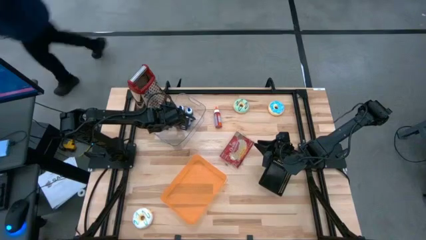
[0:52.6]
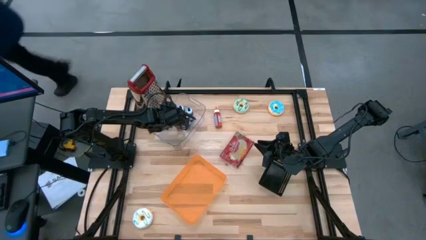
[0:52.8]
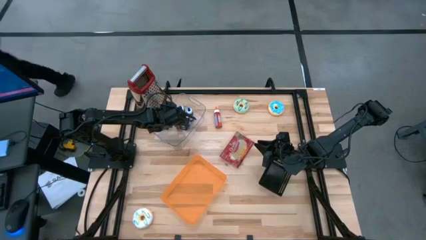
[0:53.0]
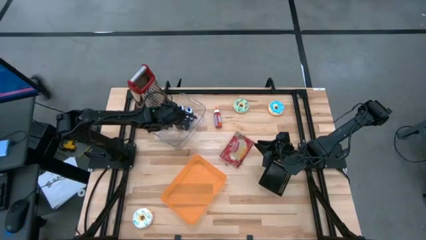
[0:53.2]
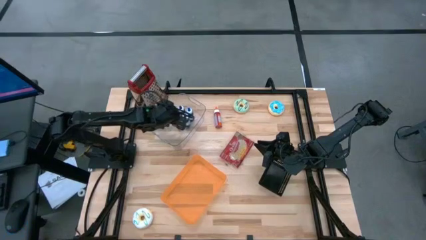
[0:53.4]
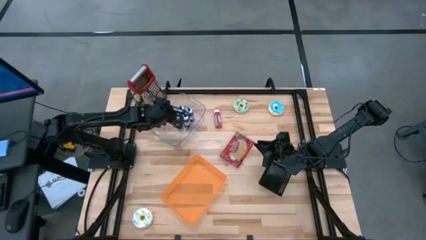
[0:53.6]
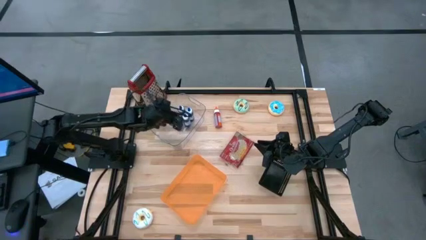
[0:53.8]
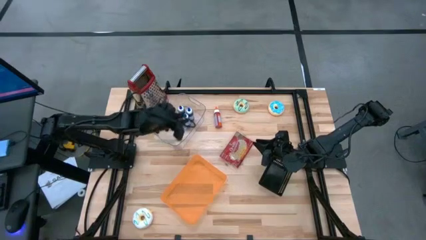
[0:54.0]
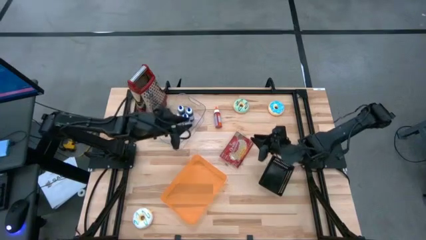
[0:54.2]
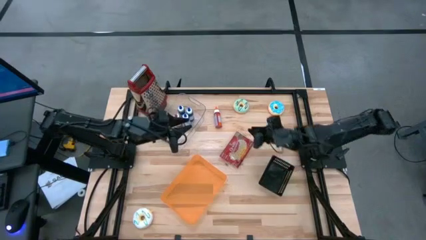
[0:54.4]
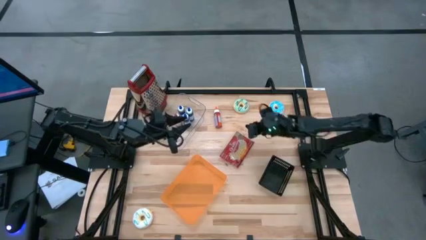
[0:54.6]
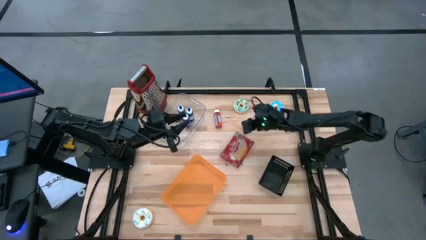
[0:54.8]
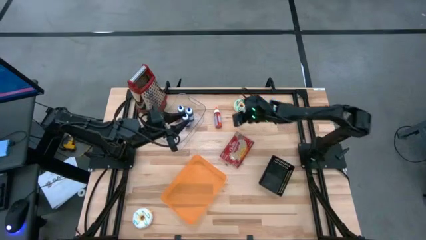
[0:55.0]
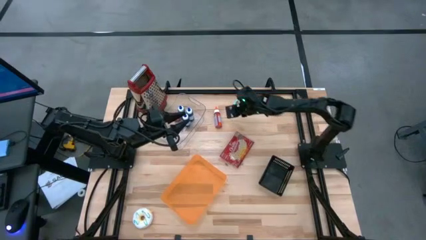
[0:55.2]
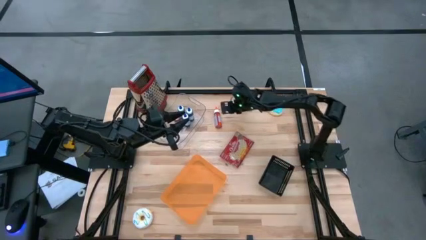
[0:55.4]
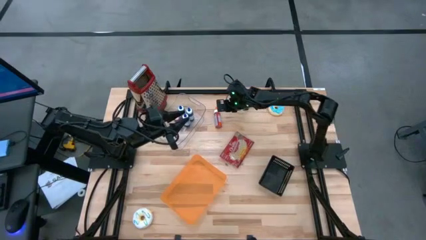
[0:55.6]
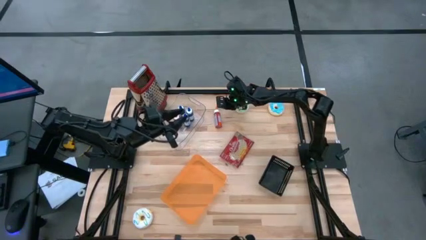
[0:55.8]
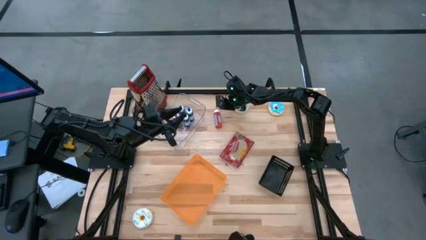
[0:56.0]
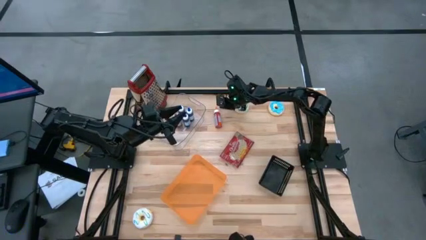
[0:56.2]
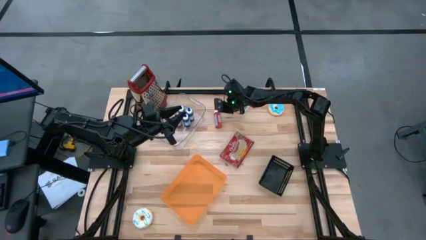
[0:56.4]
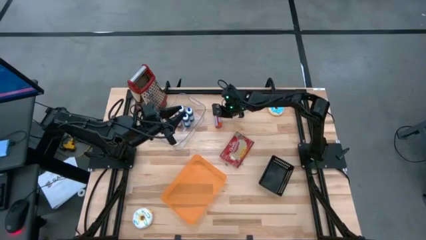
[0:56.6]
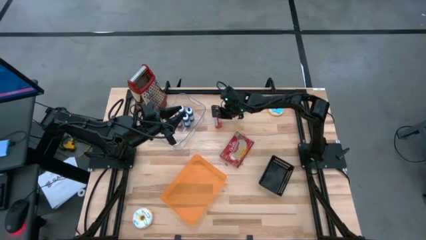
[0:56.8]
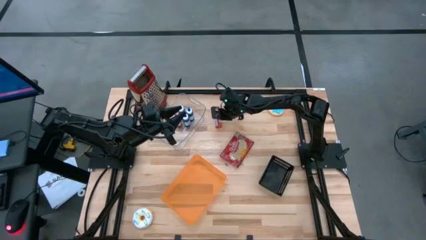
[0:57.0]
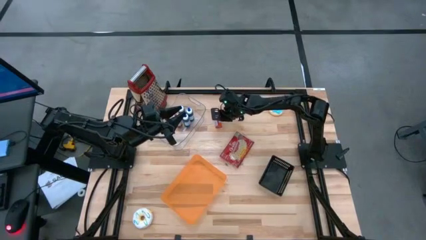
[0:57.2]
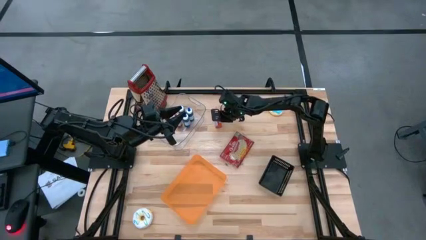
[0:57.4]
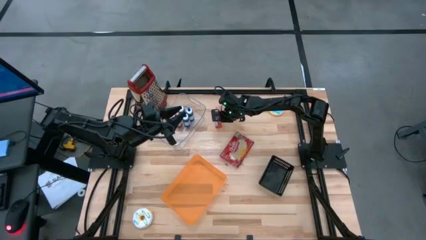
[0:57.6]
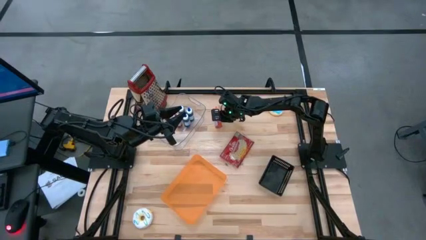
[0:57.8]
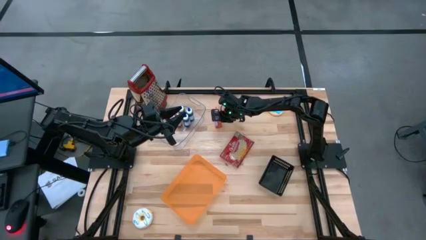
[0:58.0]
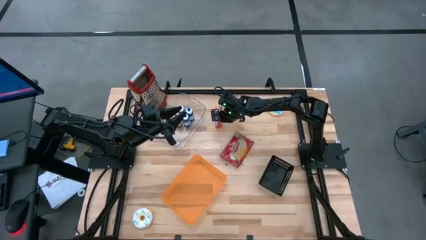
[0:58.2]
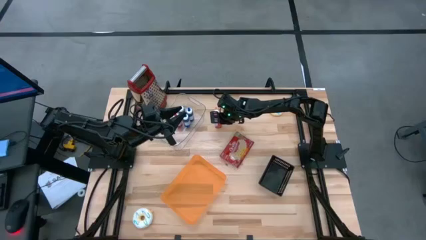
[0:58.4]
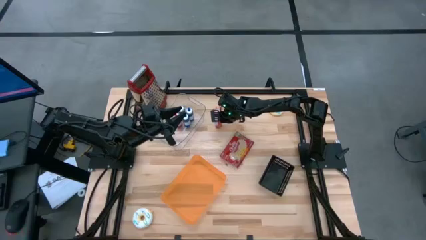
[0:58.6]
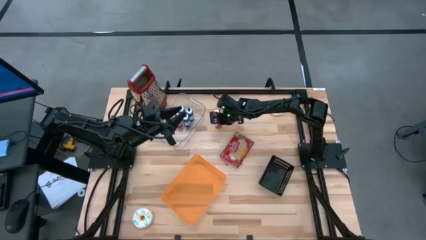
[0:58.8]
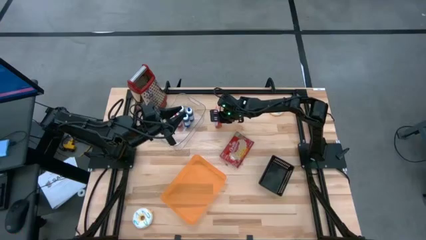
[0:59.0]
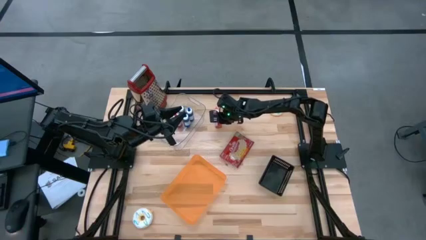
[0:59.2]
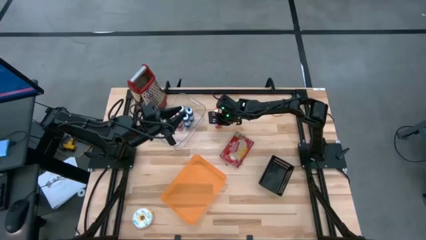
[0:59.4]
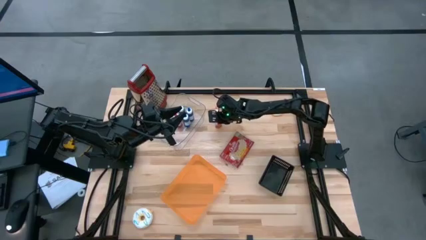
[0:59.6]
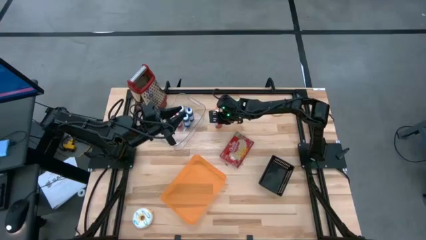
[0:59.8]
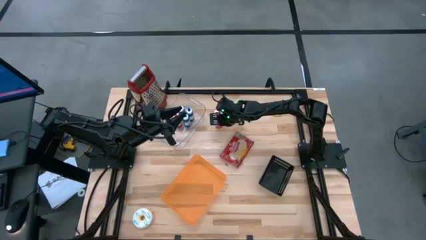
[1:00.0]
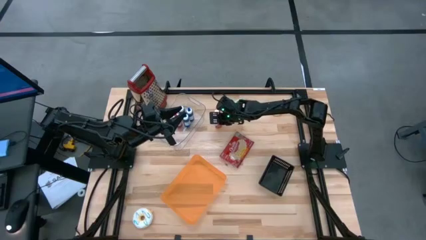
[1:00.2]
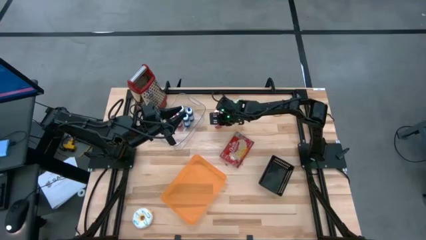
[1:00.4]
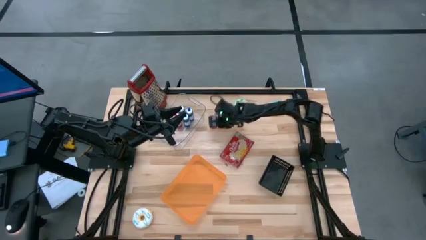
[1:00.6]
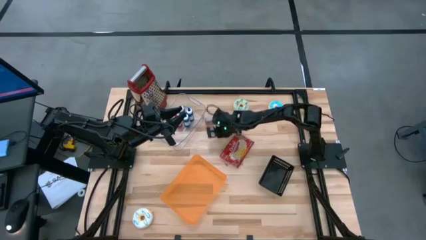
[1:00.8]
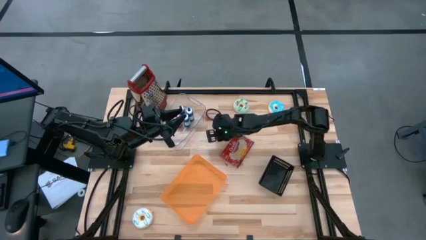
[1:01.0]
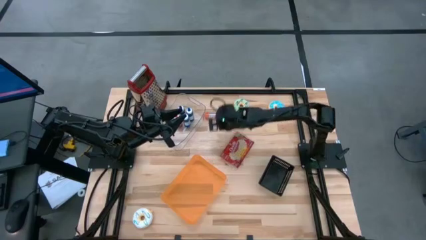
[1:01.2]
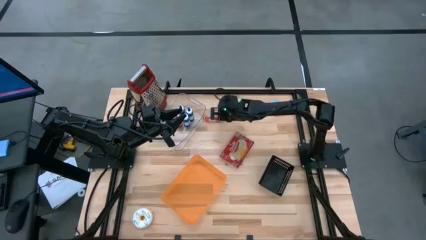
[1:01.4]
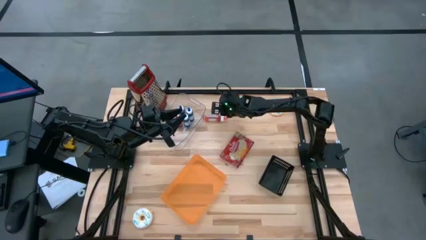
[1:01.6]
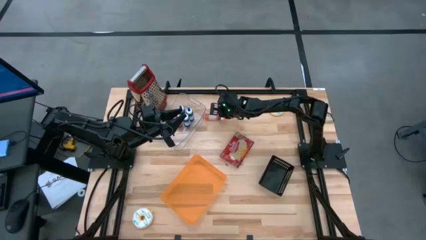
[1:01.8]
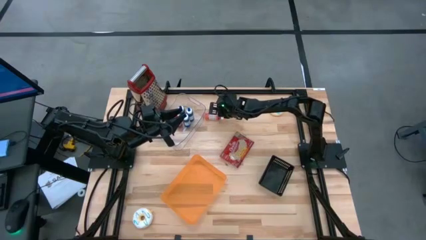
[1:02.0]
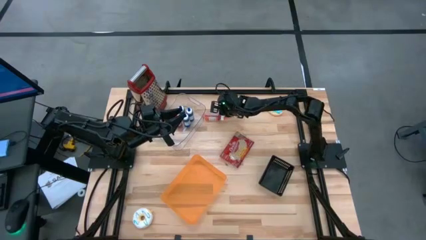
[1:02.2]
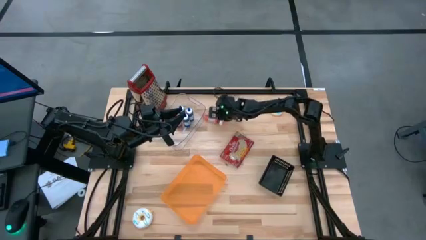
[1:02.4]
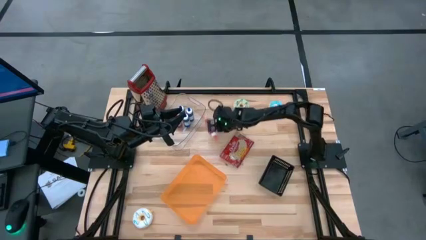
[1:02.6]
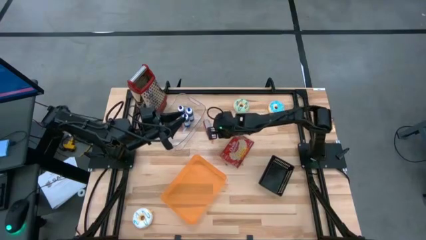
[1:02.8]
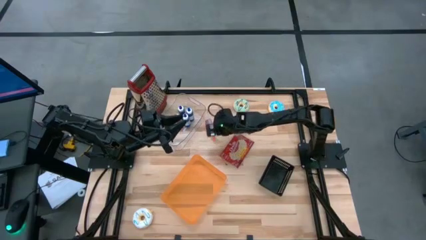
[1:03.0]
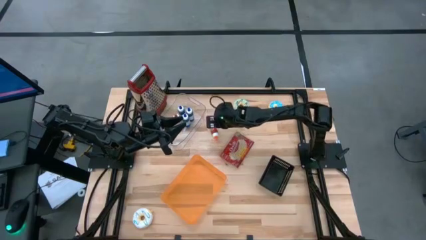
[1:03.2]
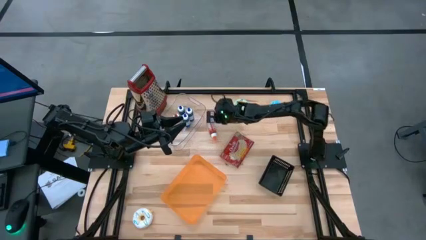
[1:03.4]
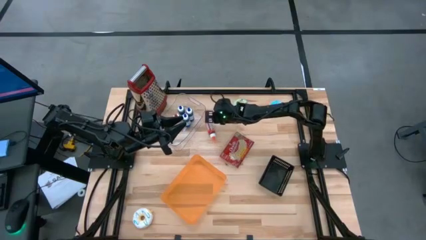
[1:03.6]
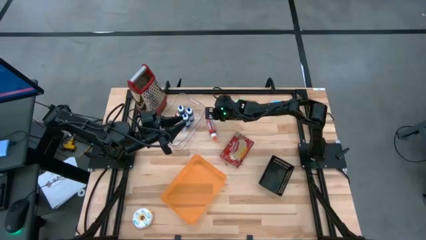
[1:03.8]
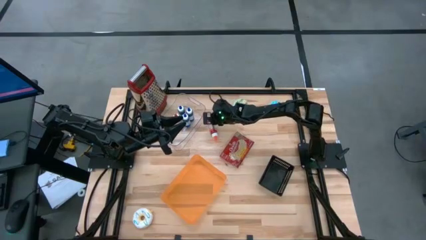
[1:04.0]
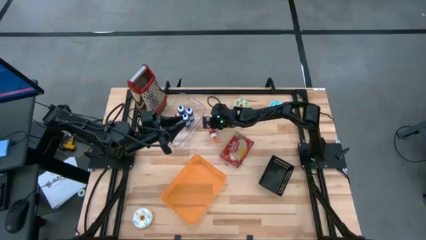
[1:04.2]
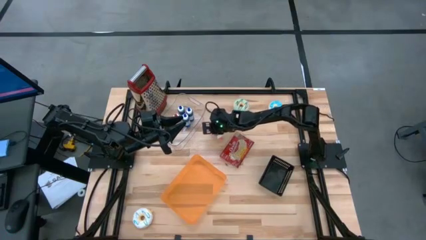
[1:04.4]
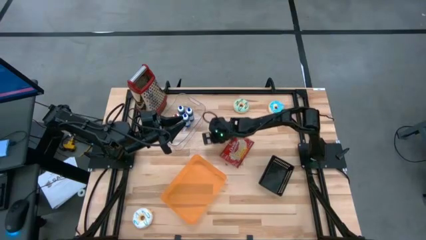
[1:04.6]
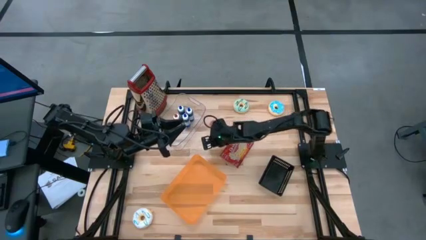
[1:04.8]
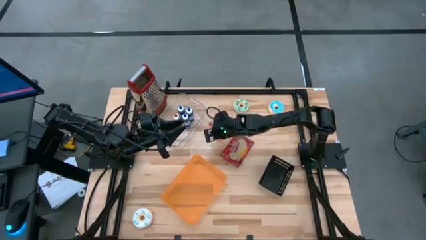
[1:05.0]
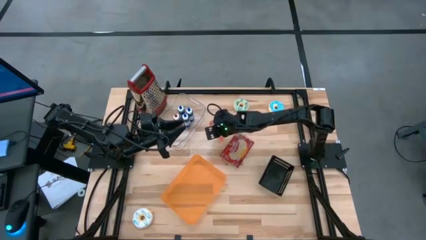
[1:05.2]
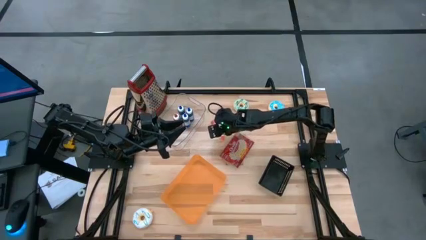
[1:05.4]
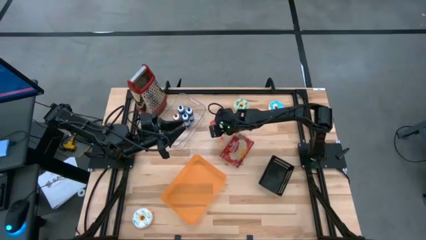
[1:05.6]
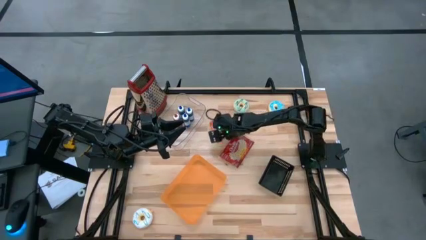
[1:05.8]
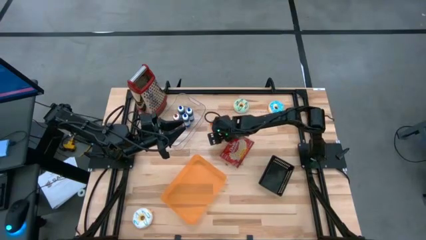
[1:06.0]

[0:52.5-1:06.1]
Put the orange food coloring bottle into the transparent bin
